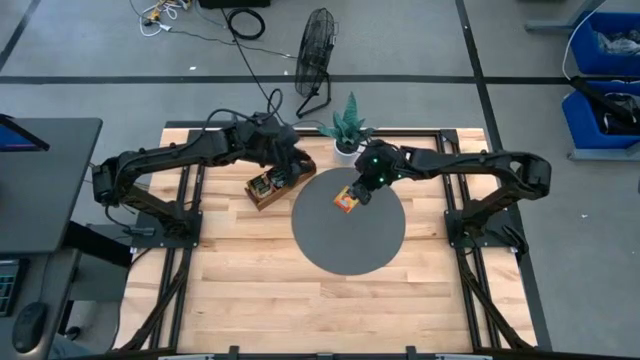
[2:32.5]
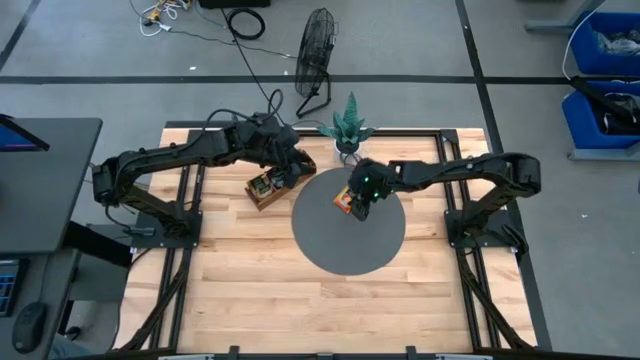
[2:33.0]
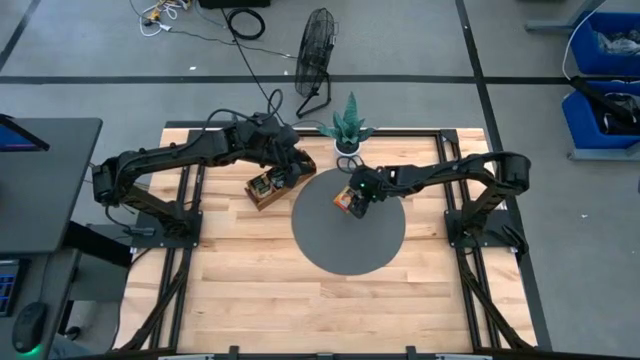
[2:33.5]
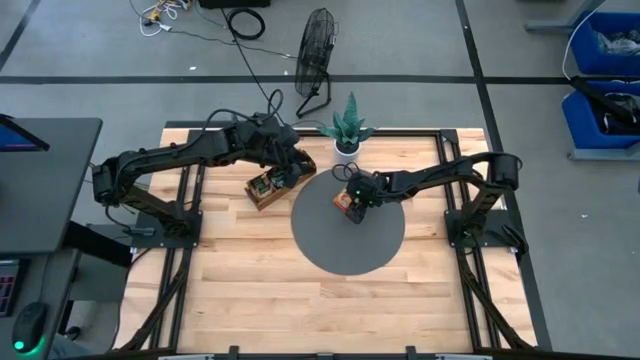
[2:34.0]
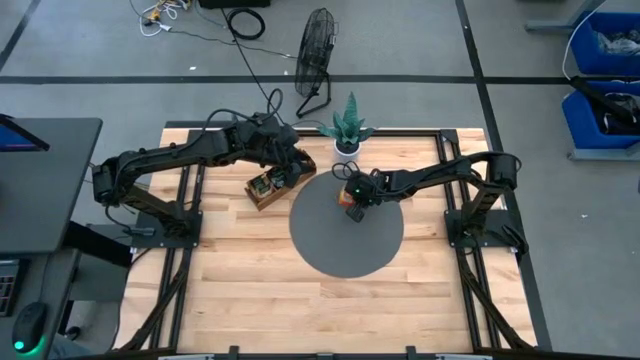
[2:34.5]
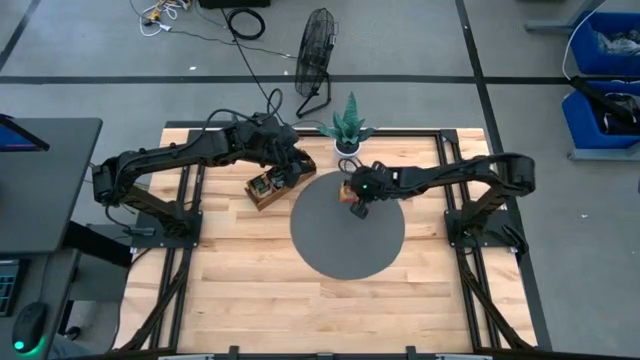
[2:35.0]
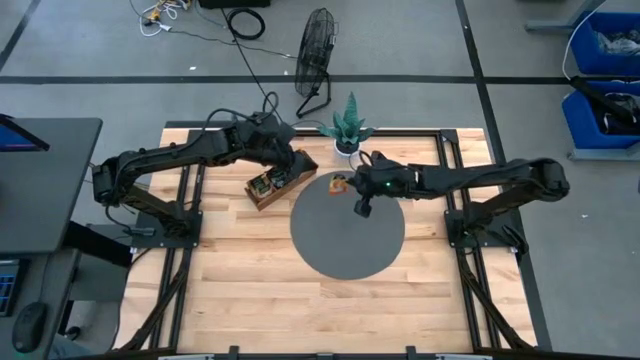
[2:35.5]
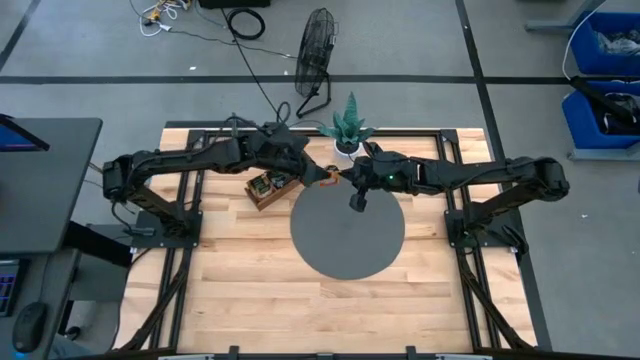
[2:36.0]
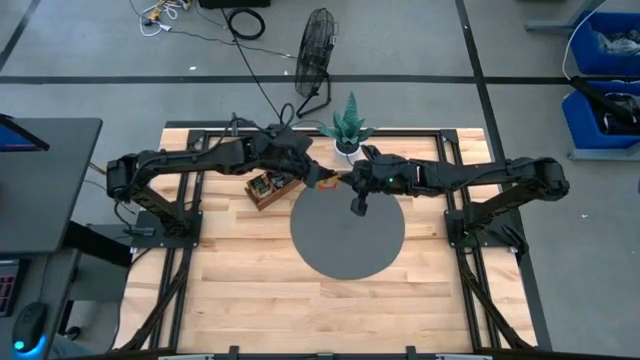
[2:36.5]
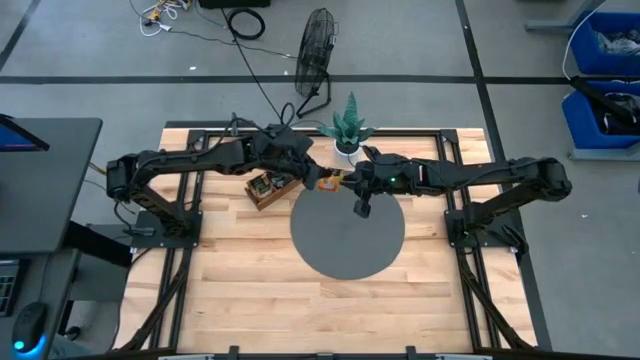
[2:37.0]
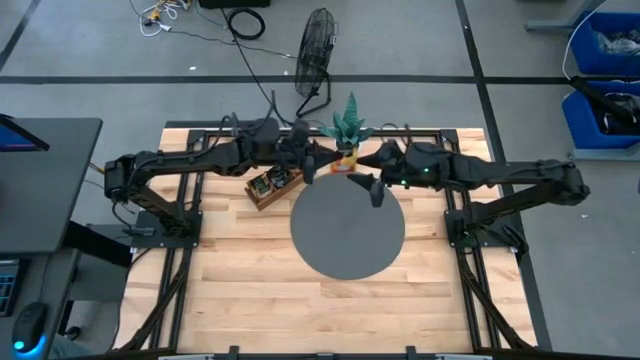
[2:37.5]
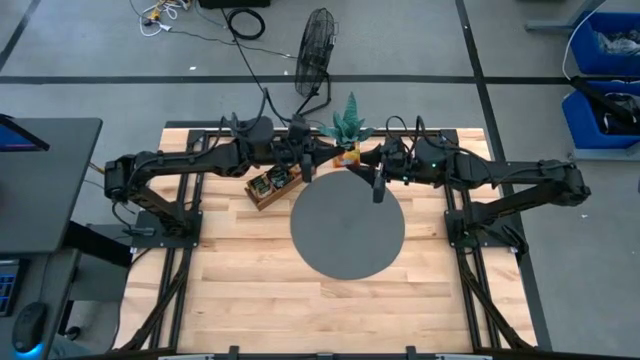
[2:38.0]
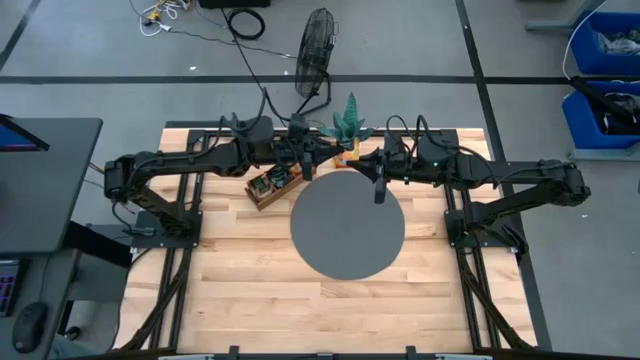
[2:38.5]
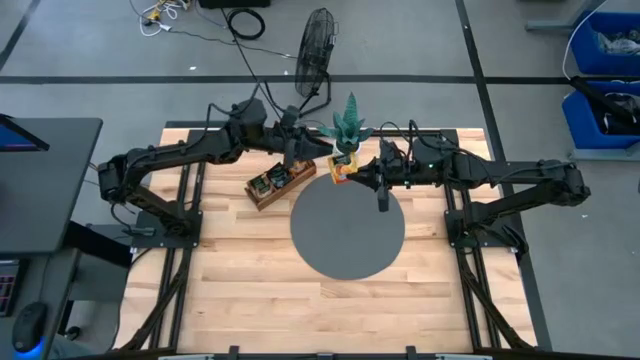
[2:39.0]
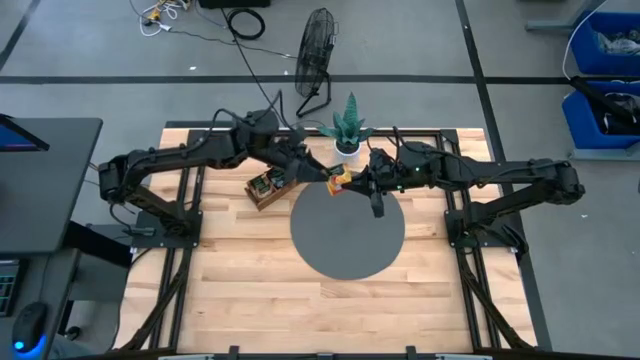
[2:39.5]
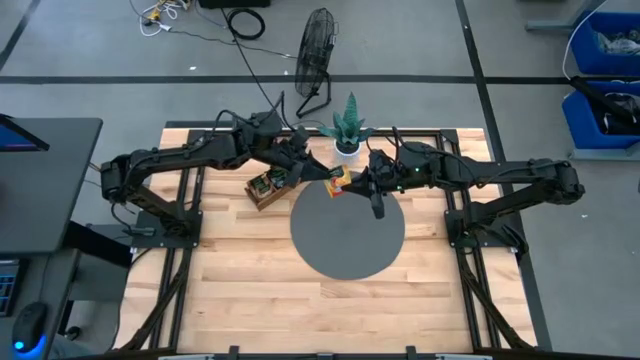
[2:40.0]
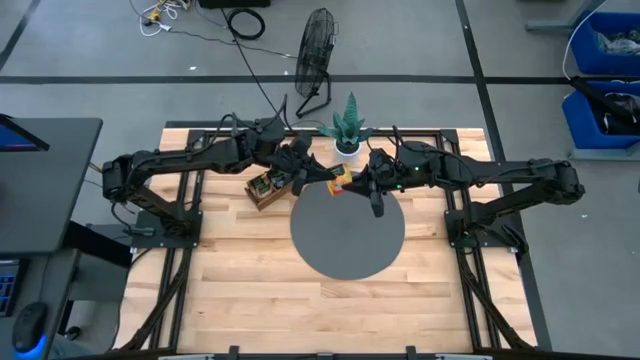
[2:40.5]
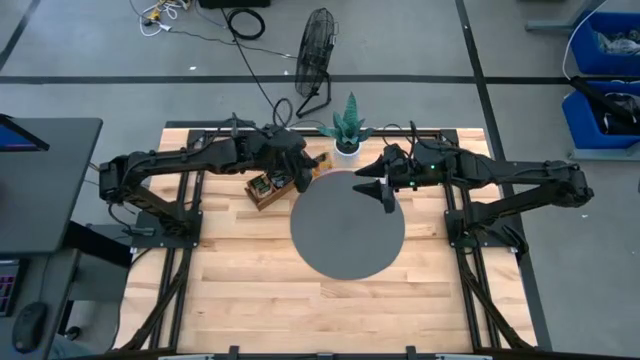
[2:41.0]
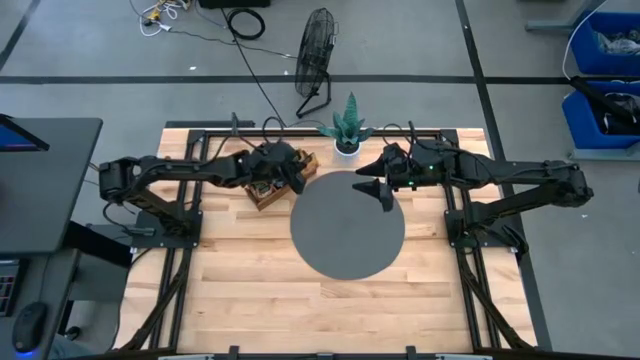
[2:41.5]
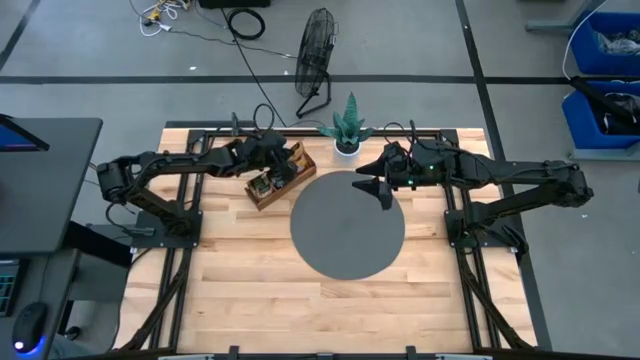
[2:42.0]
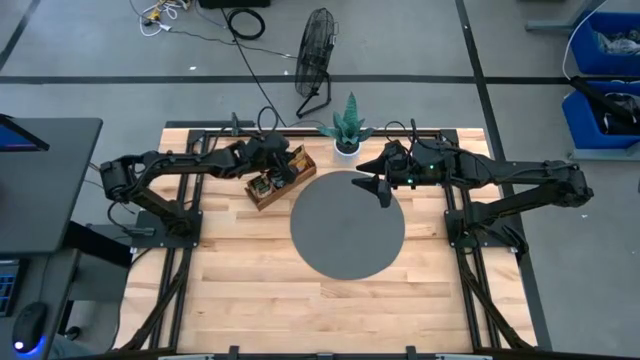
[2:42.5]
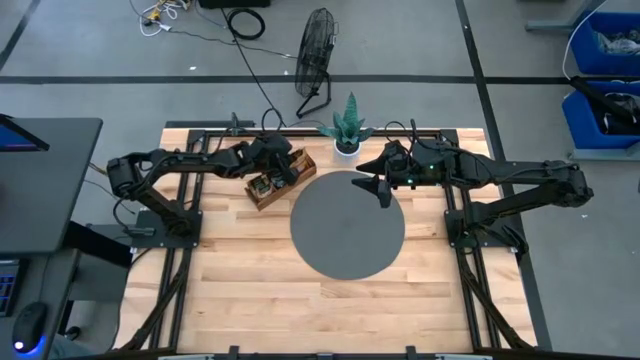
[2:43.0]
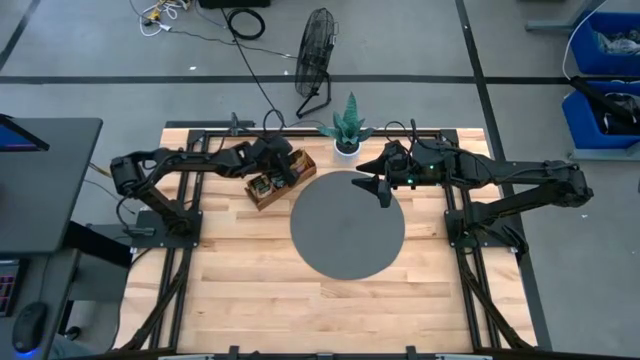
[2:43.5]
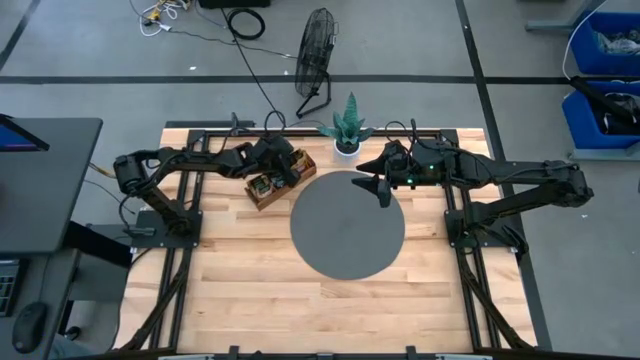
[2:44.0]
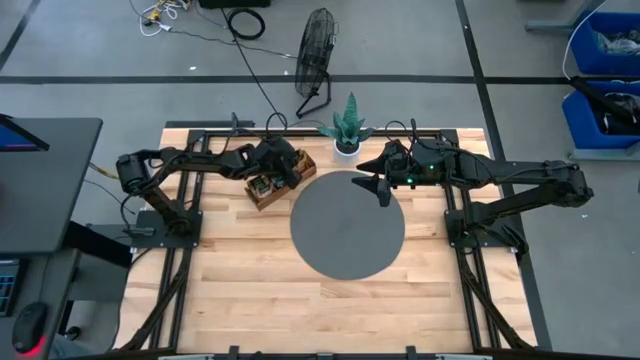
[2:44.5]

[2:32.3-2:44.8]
Task: Pick & Place Tea
Put the orange tea bag into the right section of the wooden organizer

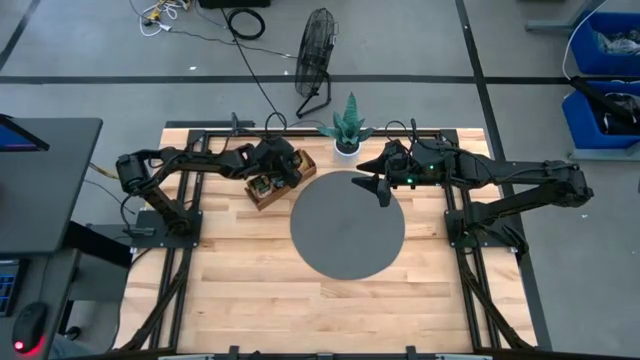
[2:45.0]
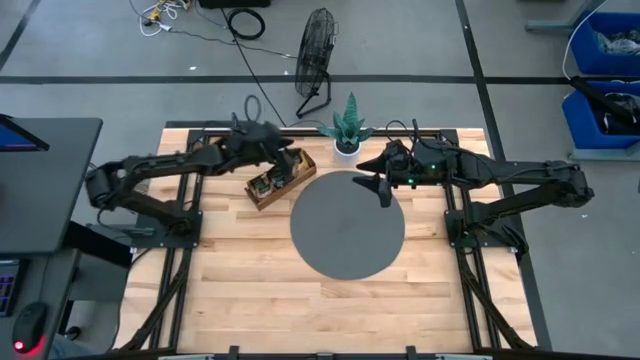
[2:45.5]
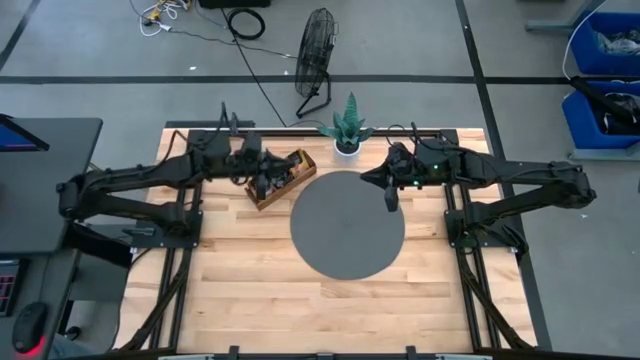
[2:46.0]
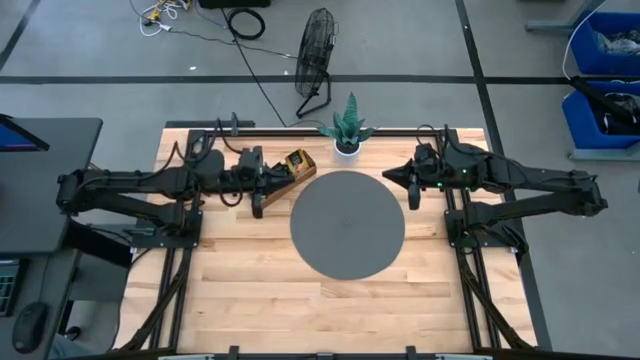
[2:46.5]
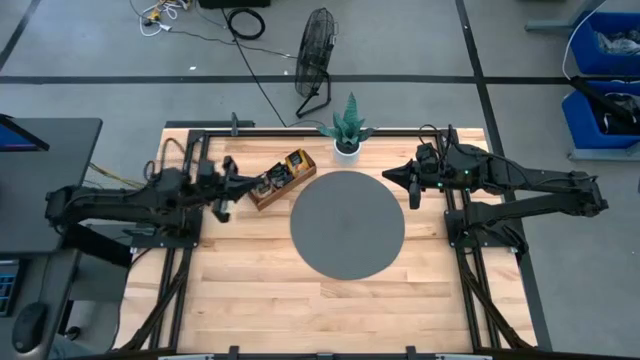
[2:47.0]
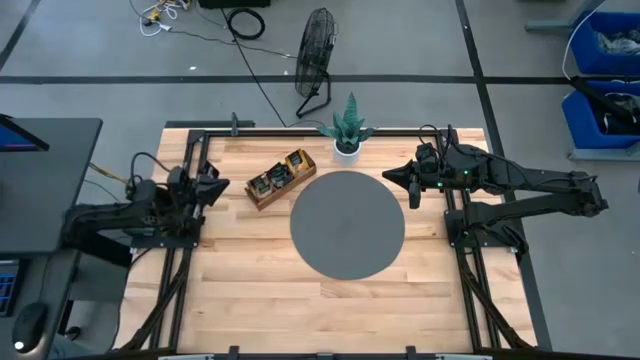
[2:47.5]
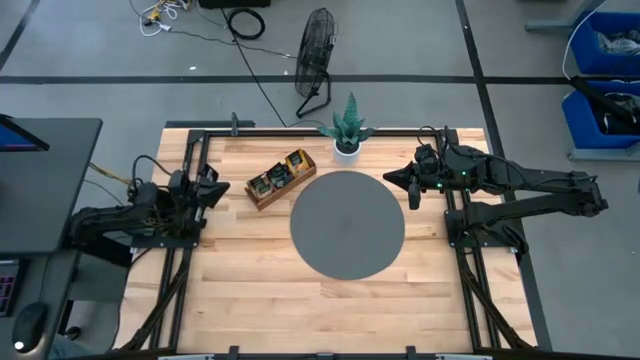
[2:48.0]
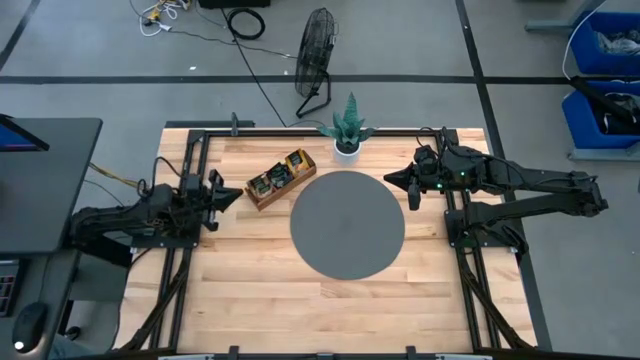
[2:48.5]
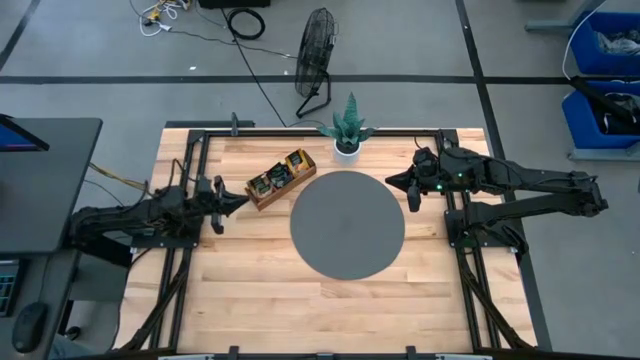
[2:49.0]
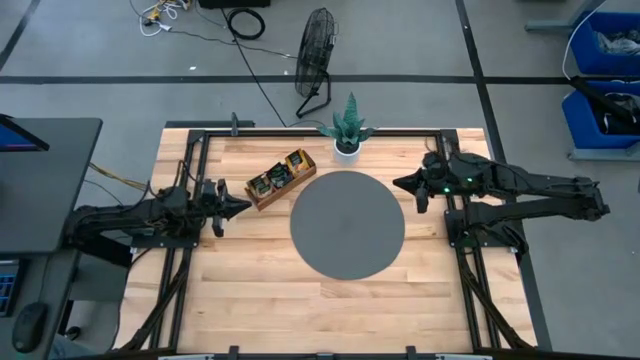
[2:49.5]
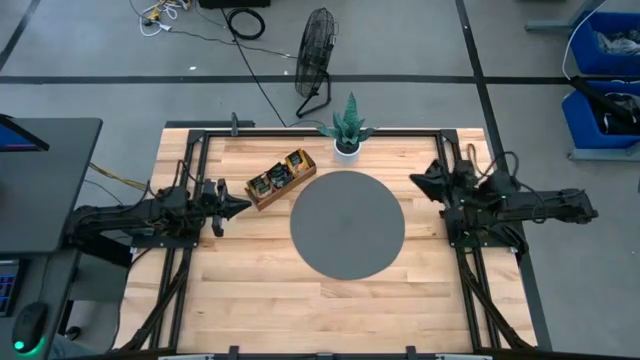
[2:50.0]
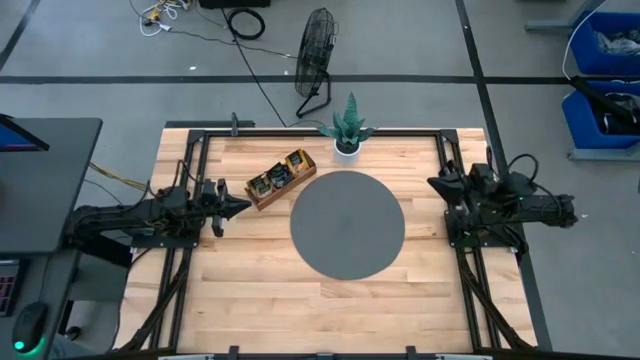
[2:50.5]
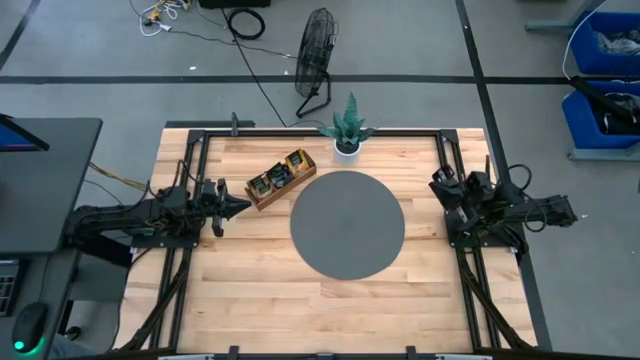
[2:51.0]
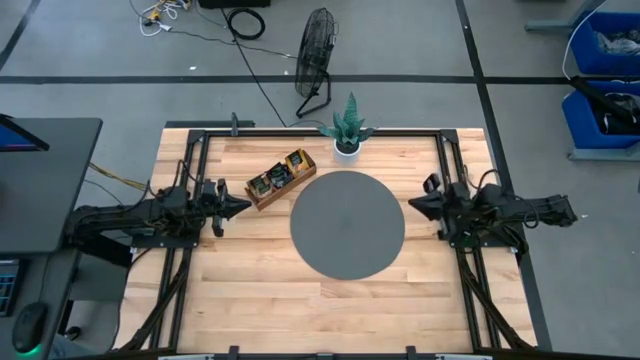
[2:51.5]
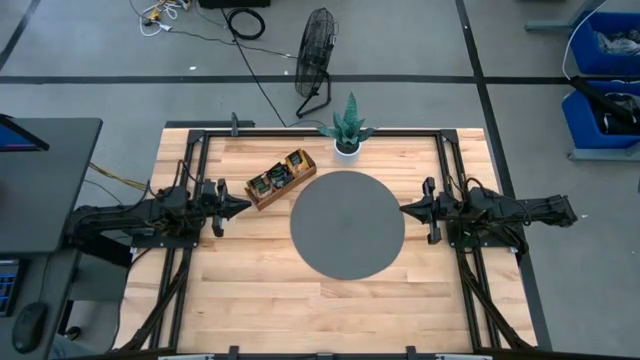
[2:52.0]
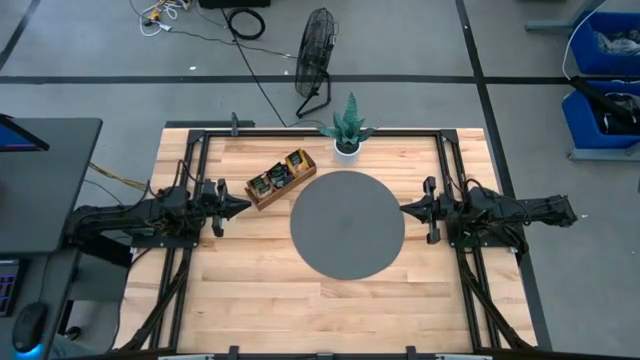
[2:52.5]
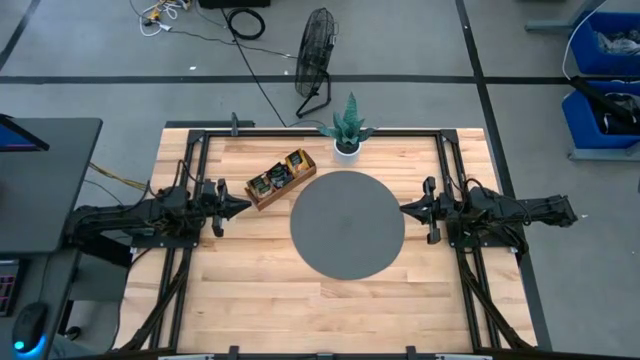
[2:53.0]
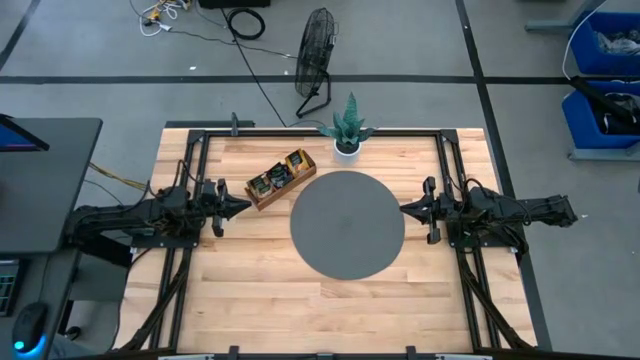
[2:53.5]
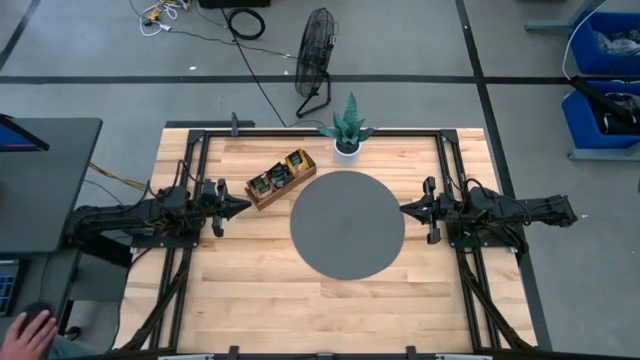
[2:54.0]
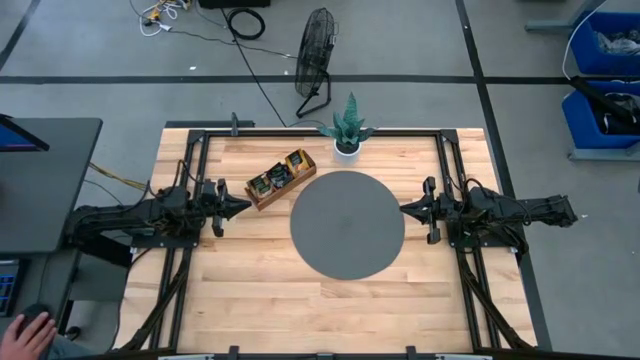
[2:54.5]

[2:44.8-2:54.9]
Return to Home Position
